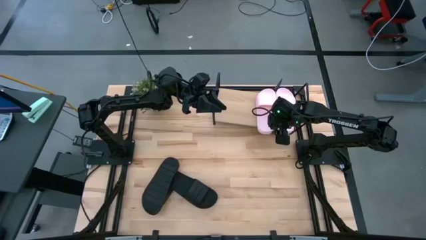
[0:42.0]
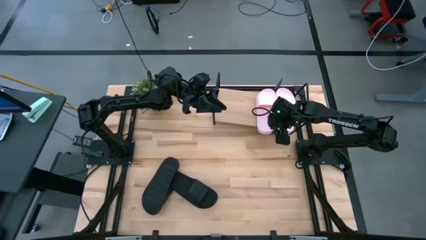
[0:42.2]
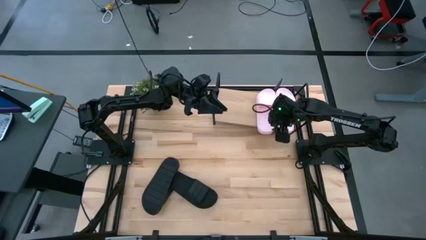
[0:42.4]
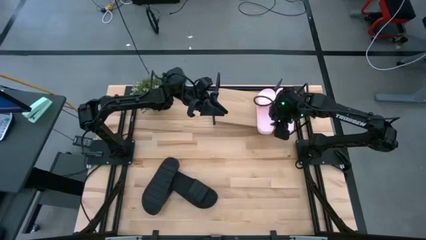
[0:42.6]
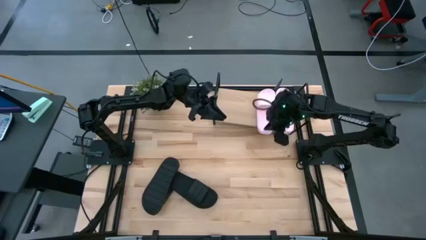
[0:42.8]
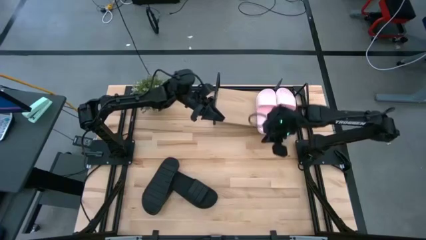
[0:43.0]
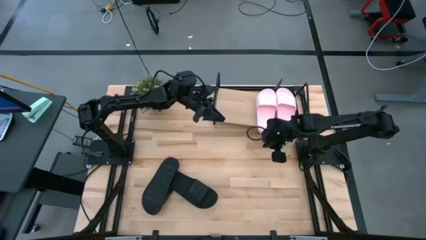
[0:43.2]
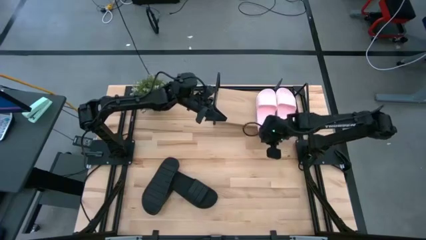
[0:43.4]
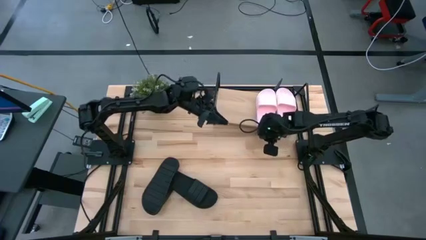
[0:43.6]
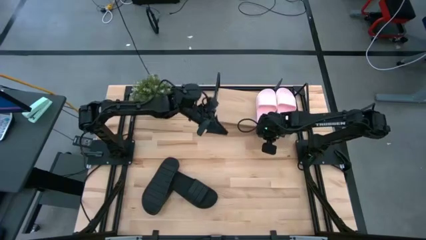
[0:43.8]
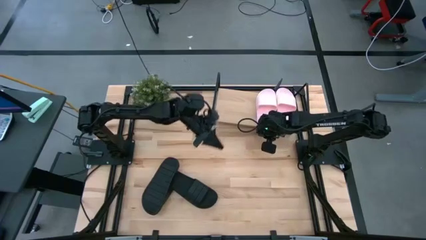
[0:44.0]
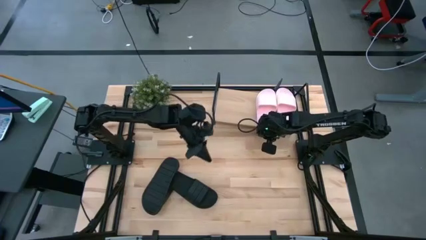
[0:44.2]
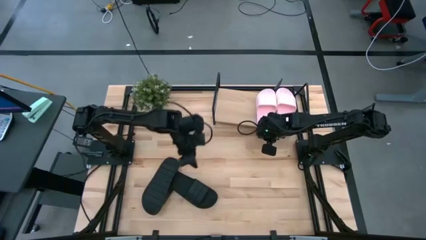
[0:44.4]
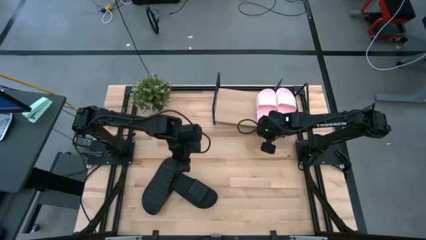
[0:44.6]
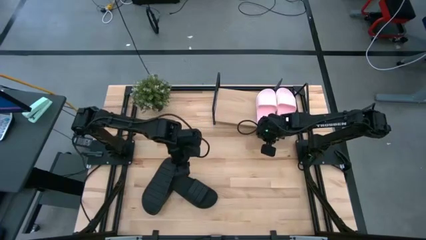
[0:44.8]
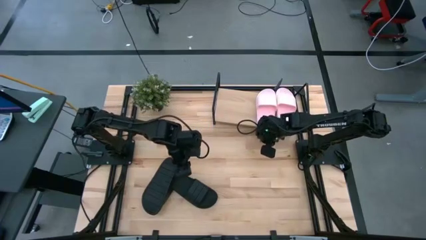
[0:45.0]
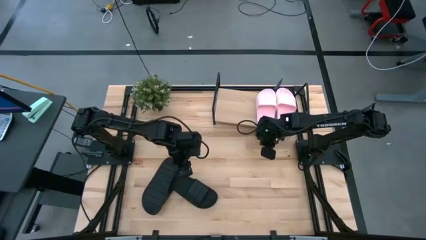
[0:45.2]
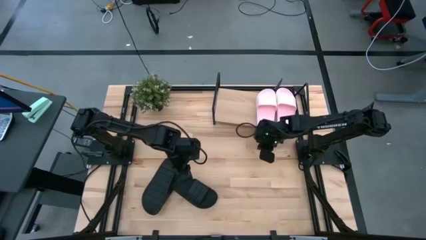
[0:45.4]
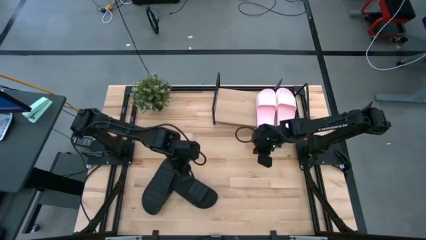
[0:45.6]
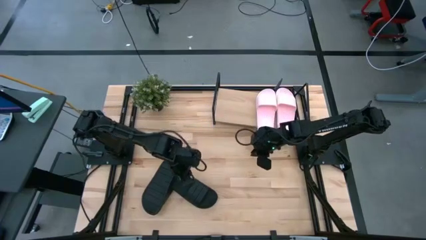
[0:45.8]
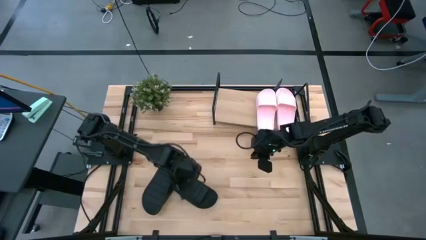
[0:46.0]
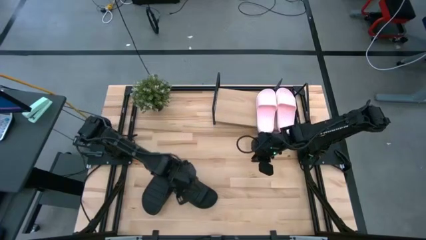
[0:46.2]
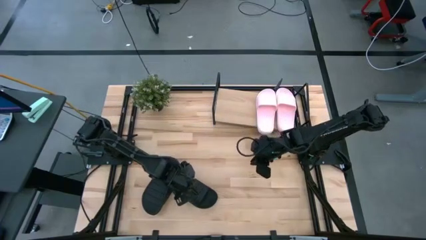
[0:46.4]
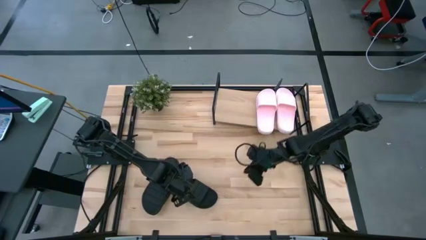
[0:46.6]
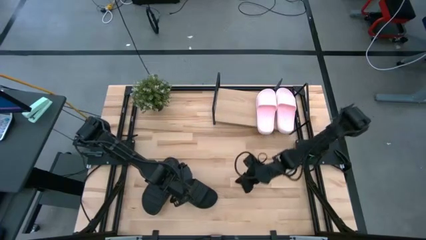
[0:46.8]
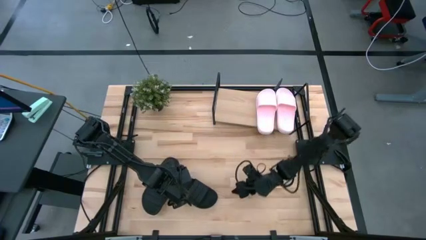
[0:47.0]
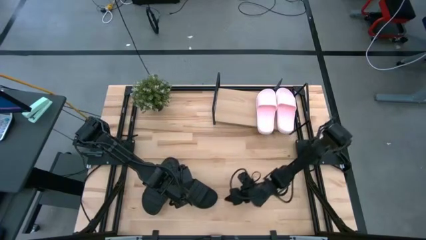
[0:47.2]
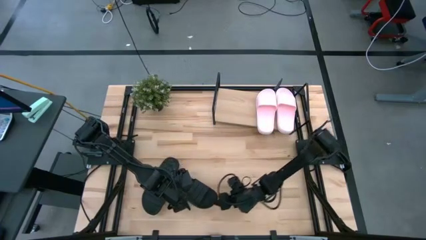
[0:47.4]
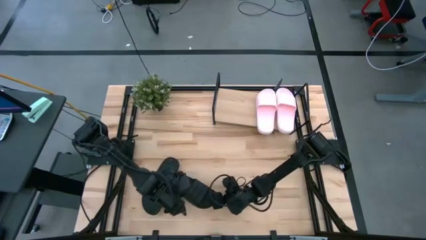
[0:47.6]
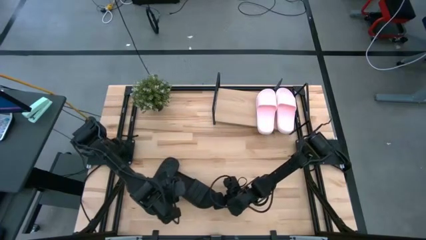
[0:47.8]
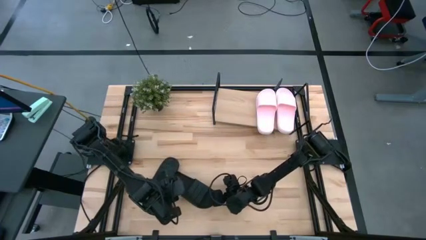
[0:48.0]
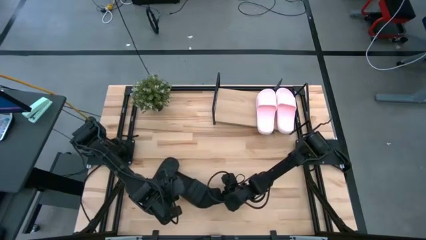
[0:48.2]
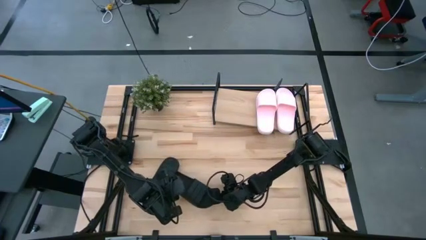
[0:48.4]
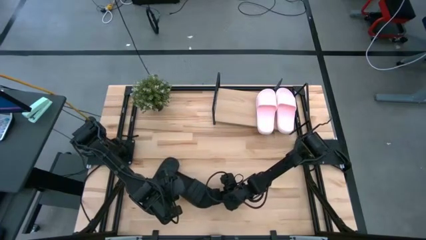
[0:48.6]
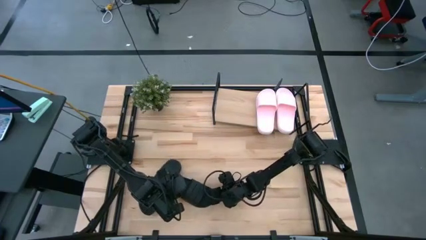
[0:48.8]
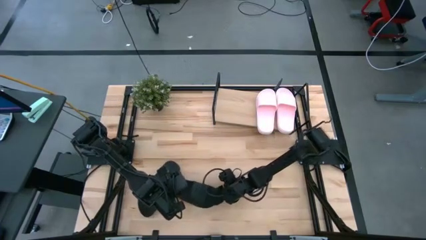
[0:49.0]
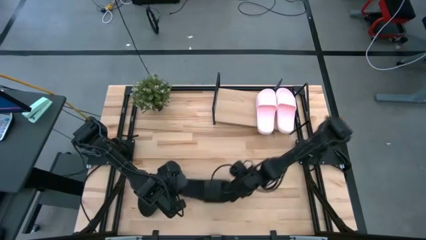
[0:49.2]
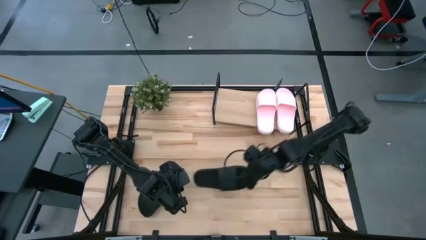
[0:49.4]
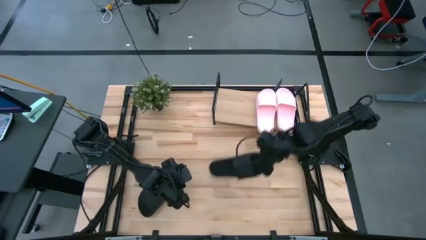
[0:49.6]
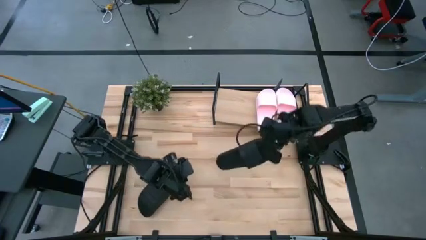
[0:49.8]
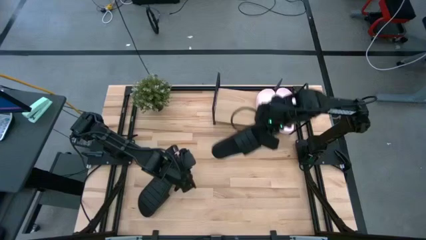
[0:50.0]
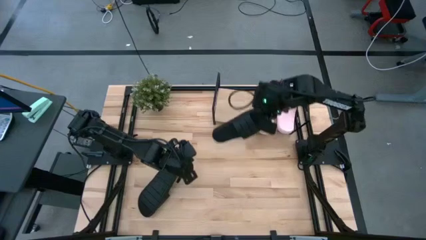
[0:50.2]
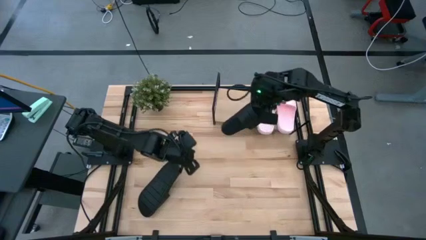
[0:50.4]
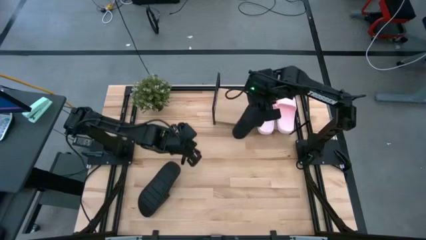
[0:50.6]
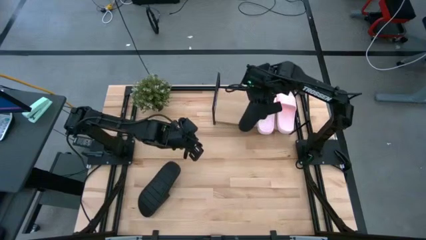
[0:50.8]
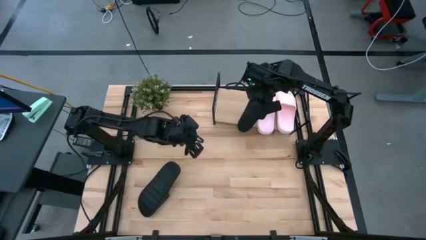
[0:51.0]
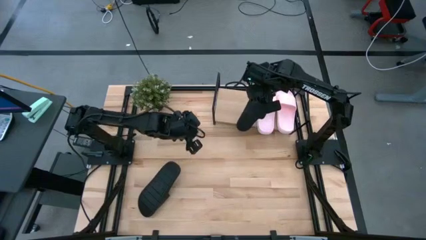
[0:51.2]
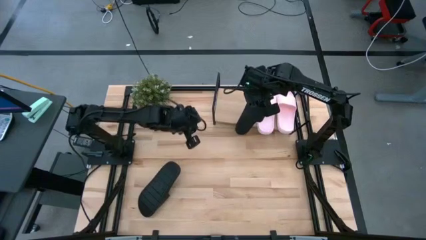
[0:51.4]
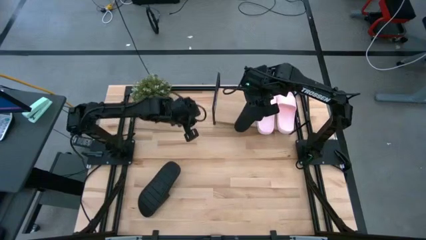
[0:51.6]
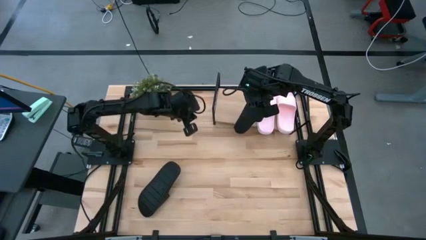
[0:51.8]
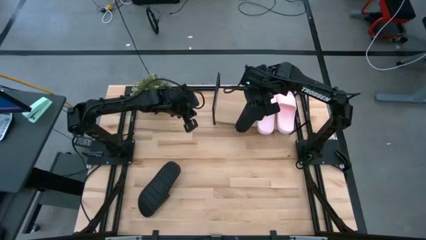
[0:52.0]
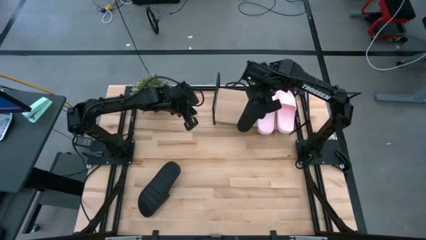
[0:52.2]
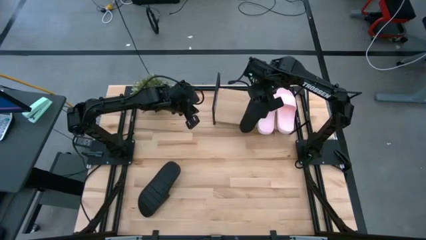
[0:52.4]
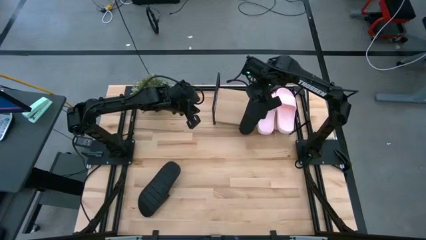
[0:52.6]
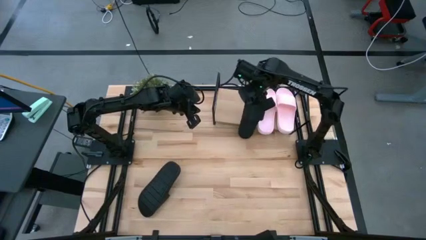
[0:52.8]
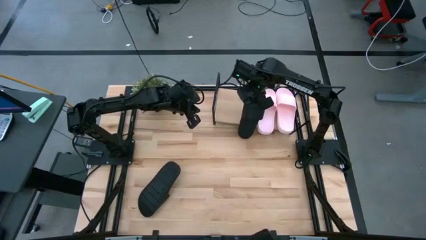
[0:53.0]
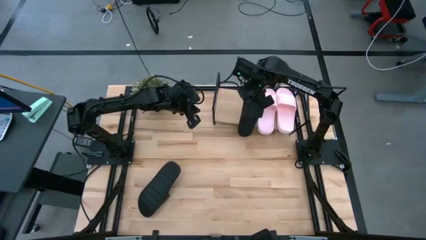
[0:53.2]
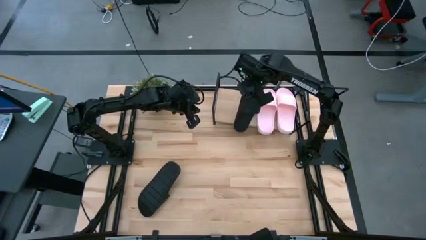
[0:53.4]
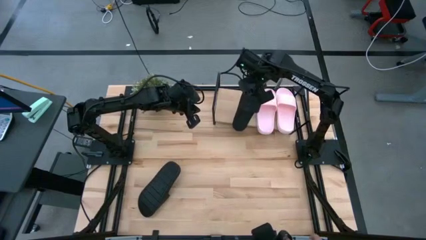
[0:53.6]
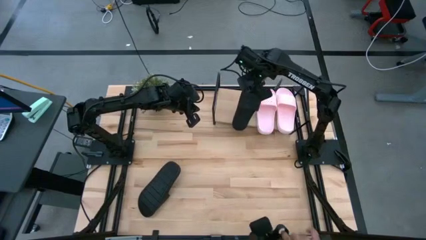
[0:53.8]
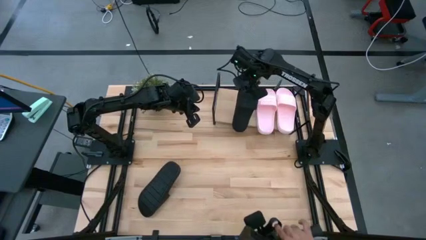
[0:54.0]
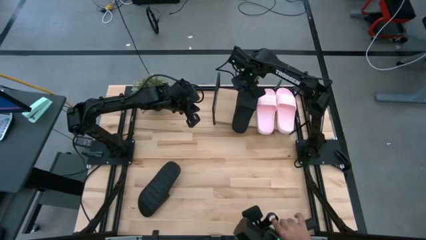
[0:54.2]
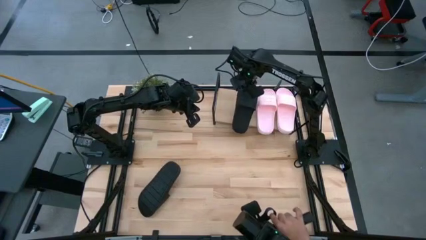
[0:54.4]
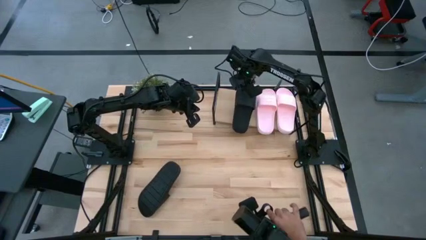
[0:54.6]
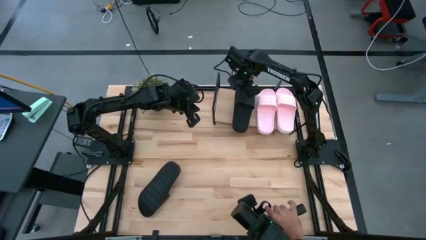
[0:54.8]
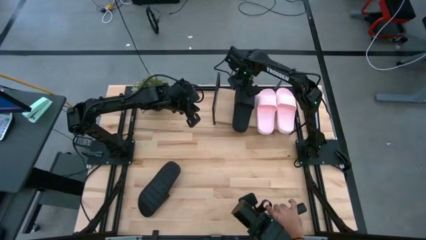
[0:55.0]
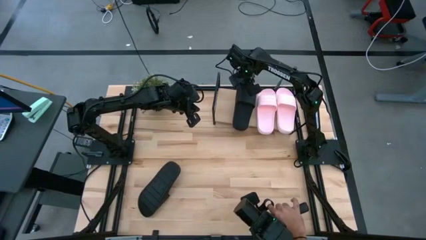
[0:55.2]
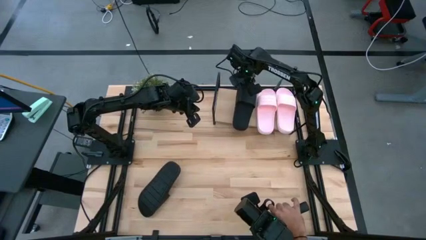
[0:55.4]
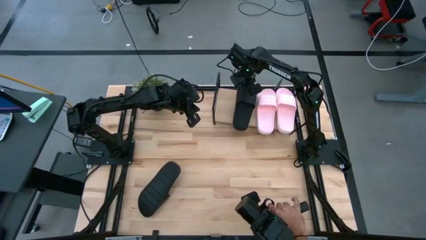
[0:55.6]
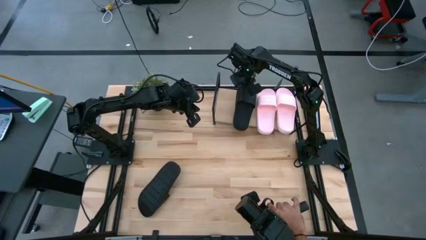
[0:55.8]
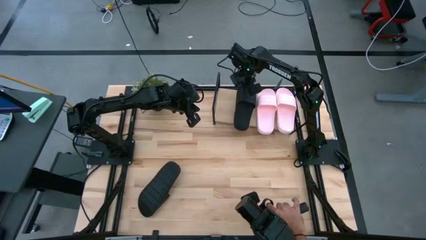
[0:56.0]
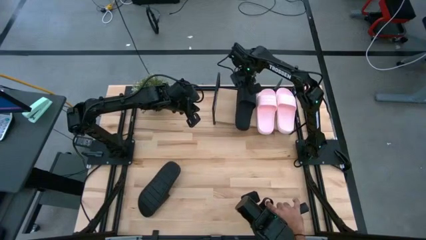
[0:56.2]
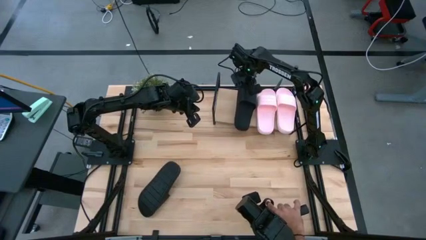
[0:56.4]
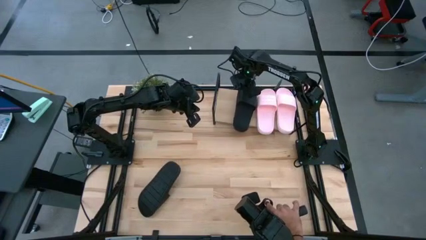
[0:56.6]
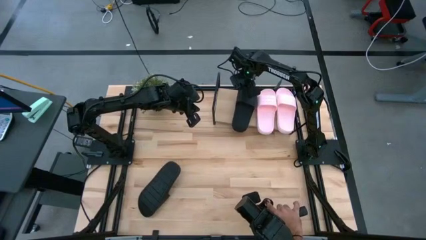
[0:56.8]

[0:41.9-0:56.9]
Task: Pick and place slides into the shelf
Put the right black slide on the shelf
